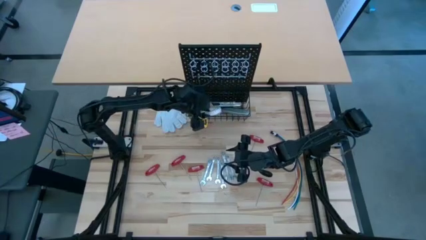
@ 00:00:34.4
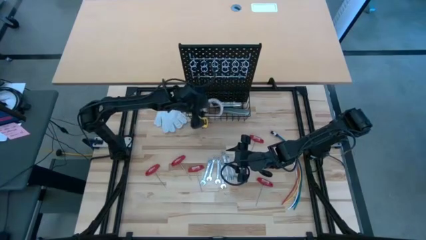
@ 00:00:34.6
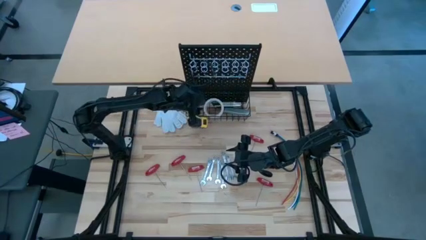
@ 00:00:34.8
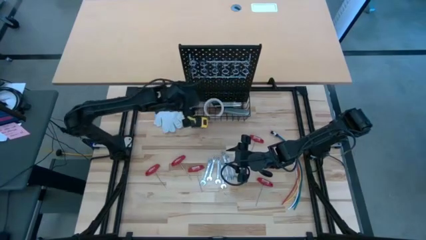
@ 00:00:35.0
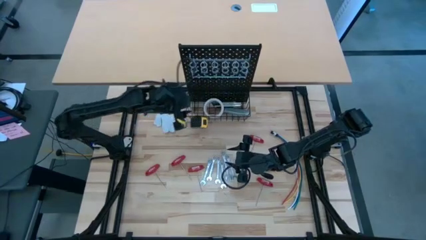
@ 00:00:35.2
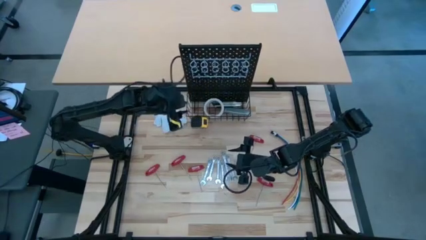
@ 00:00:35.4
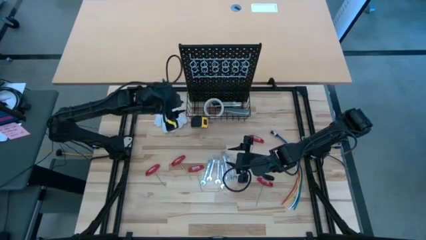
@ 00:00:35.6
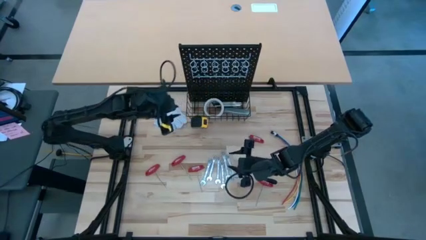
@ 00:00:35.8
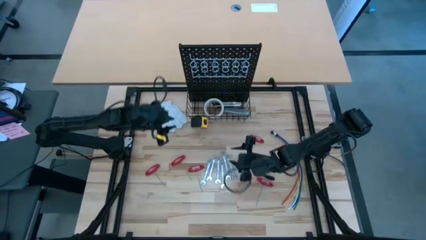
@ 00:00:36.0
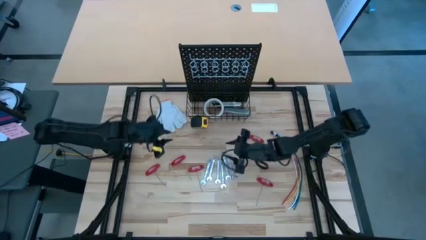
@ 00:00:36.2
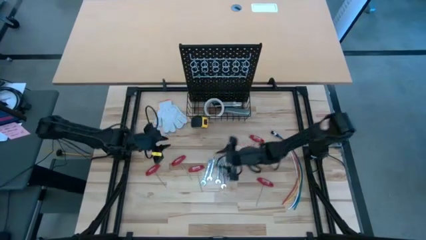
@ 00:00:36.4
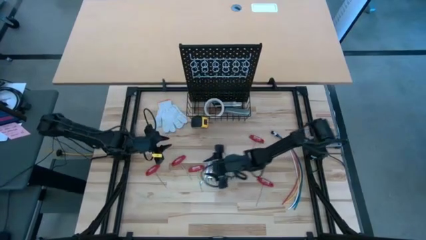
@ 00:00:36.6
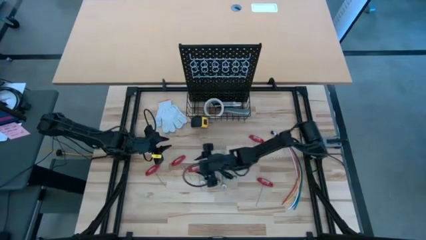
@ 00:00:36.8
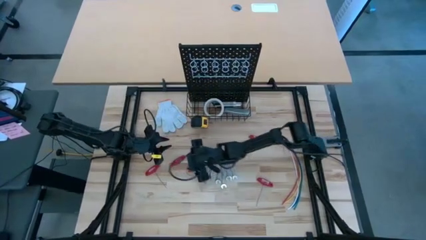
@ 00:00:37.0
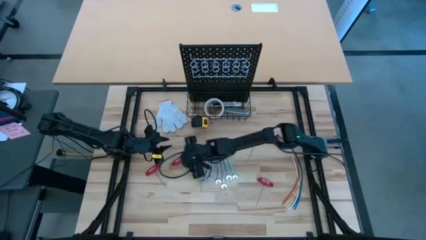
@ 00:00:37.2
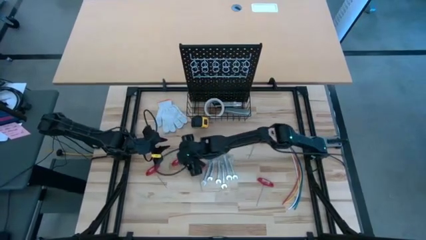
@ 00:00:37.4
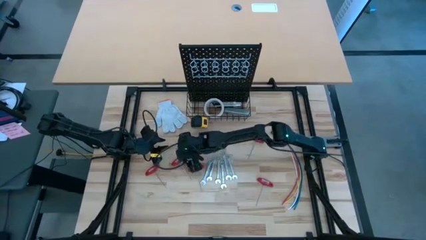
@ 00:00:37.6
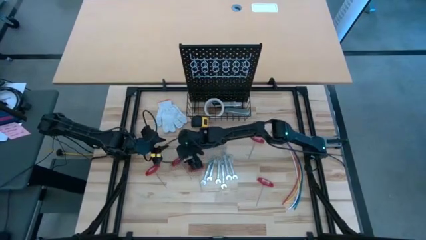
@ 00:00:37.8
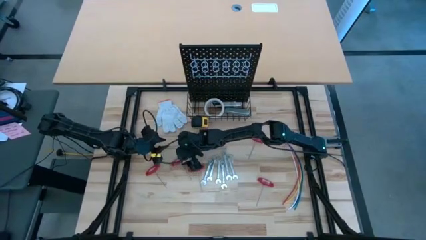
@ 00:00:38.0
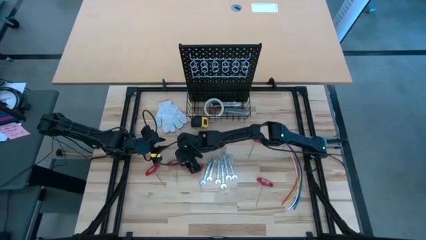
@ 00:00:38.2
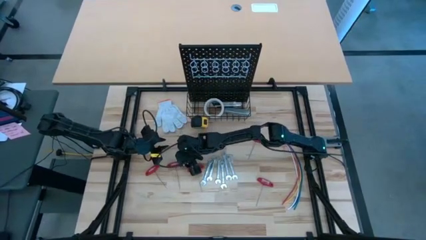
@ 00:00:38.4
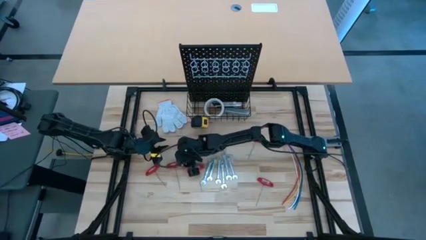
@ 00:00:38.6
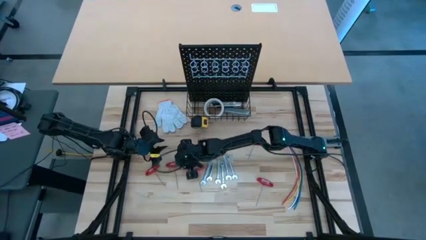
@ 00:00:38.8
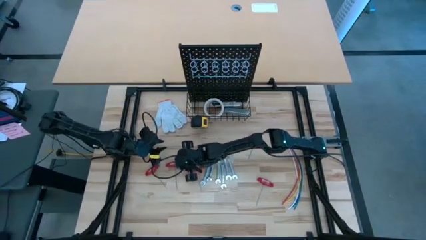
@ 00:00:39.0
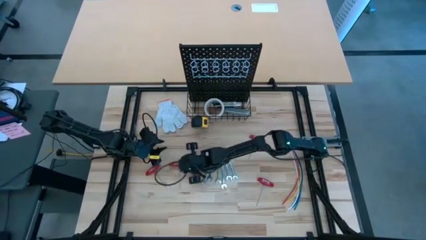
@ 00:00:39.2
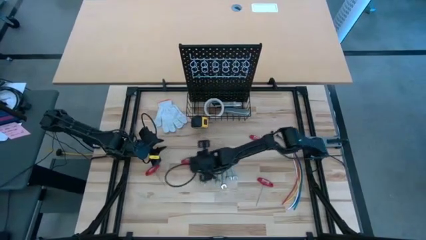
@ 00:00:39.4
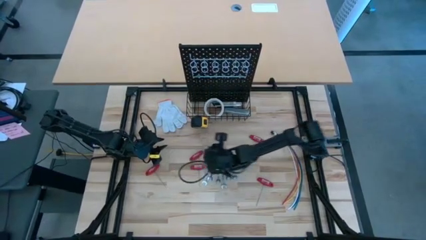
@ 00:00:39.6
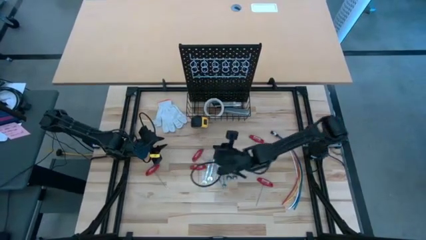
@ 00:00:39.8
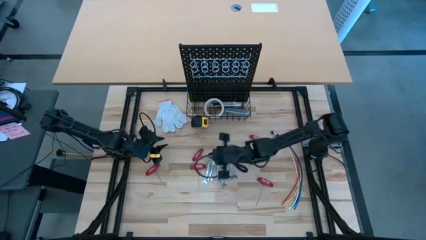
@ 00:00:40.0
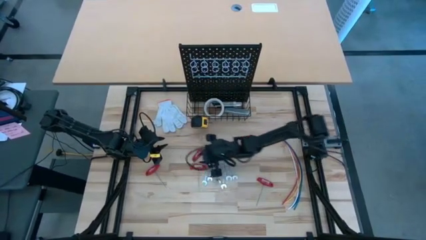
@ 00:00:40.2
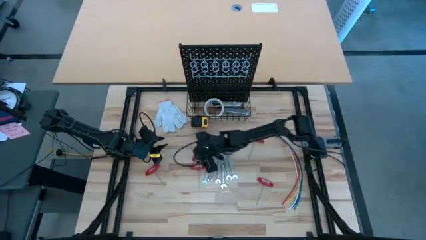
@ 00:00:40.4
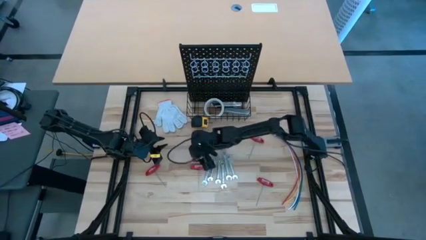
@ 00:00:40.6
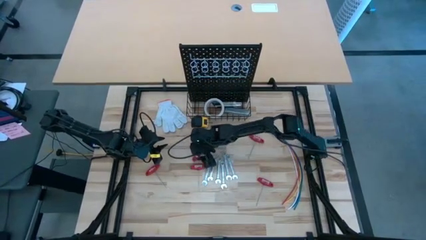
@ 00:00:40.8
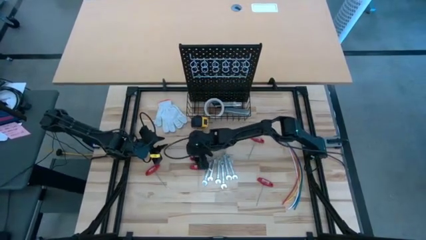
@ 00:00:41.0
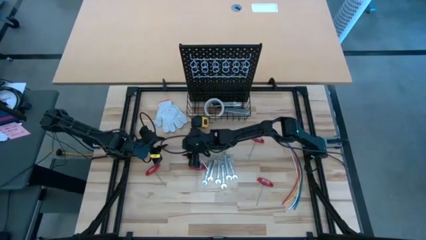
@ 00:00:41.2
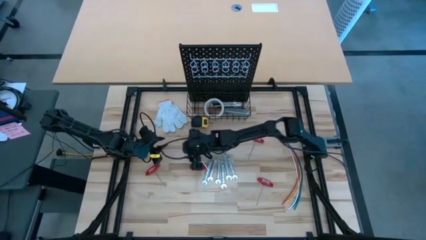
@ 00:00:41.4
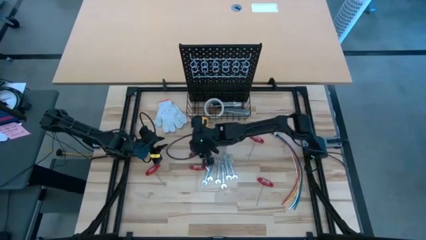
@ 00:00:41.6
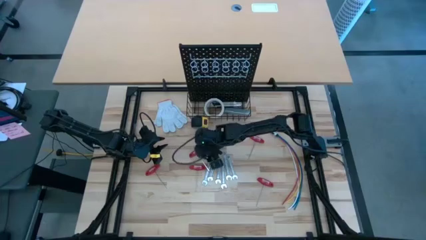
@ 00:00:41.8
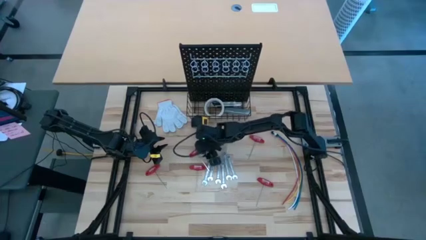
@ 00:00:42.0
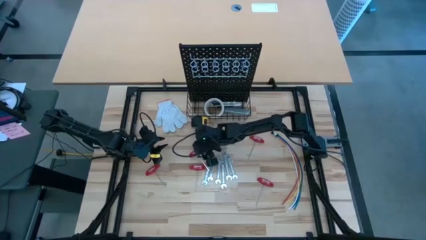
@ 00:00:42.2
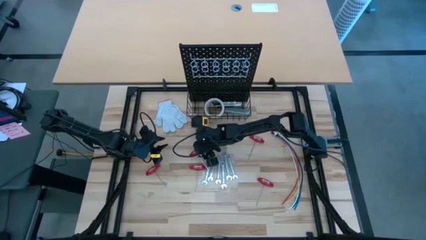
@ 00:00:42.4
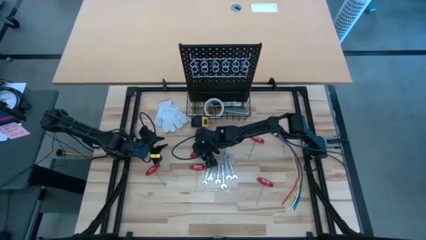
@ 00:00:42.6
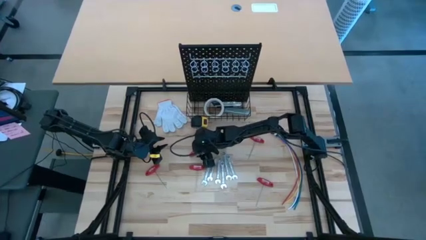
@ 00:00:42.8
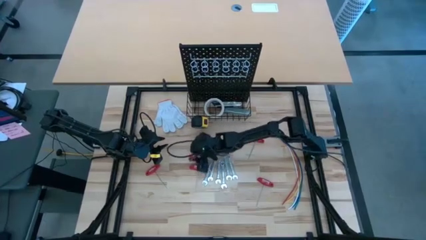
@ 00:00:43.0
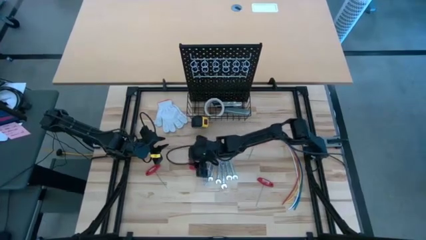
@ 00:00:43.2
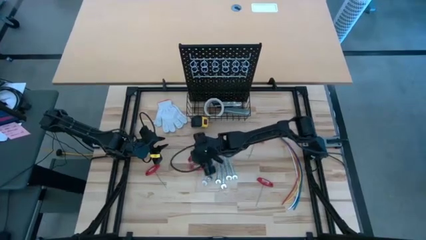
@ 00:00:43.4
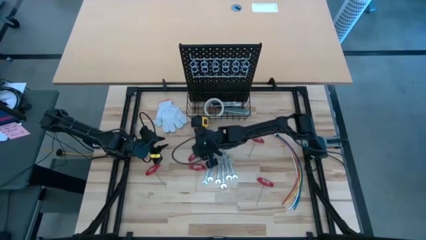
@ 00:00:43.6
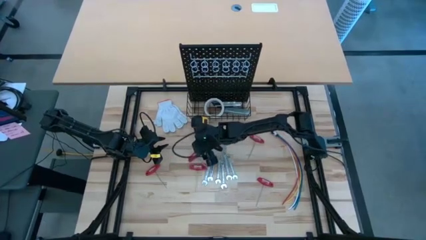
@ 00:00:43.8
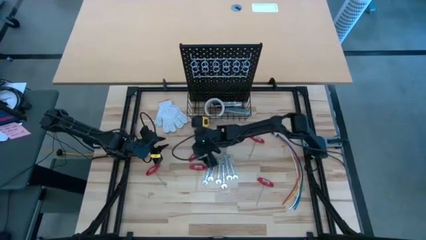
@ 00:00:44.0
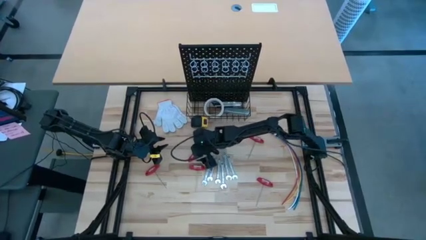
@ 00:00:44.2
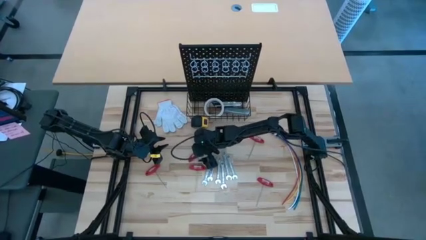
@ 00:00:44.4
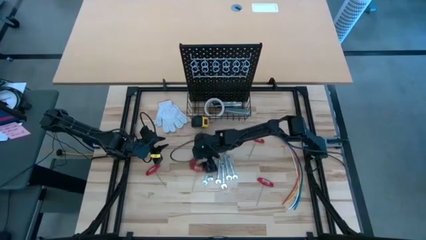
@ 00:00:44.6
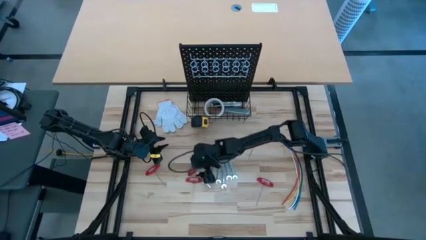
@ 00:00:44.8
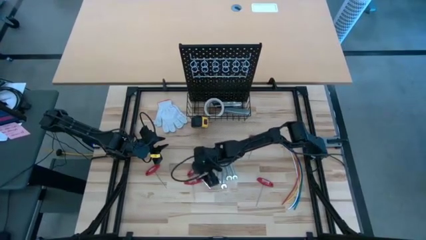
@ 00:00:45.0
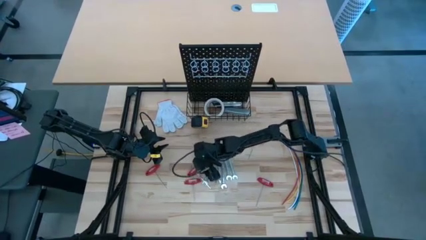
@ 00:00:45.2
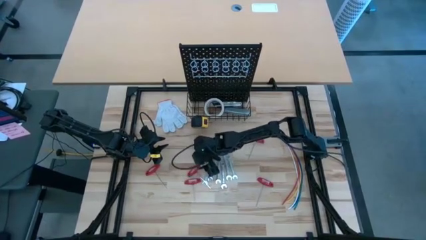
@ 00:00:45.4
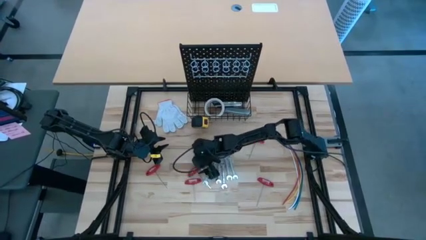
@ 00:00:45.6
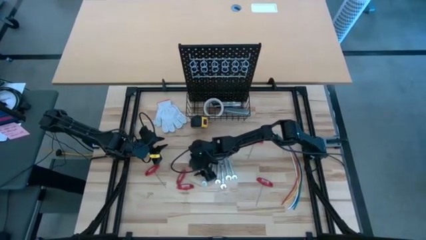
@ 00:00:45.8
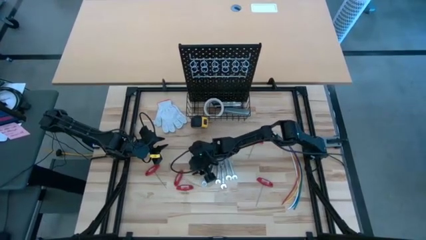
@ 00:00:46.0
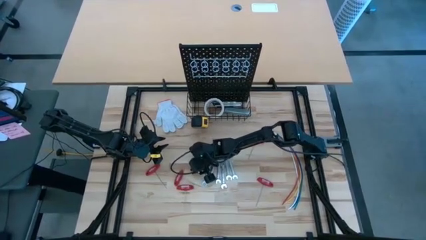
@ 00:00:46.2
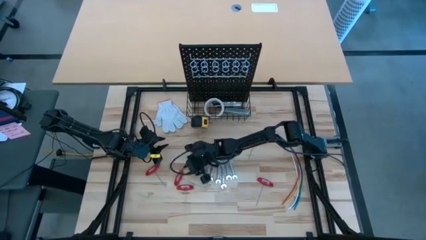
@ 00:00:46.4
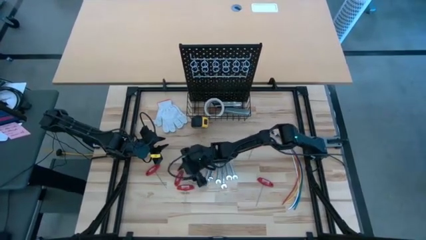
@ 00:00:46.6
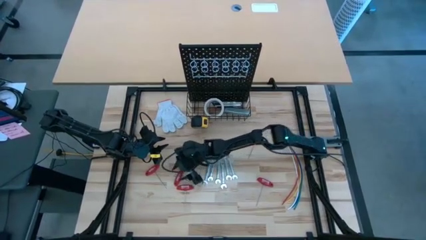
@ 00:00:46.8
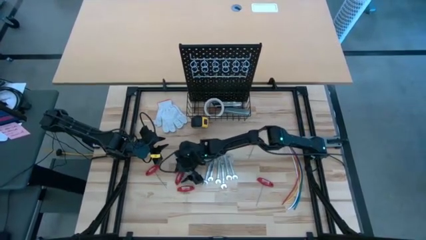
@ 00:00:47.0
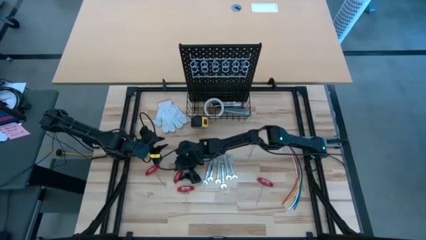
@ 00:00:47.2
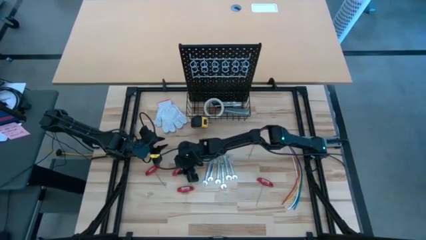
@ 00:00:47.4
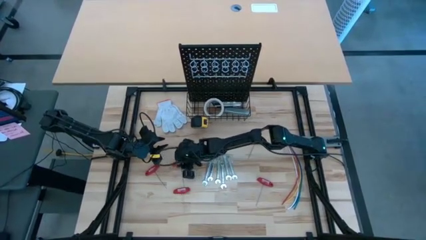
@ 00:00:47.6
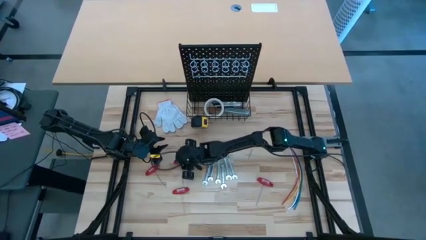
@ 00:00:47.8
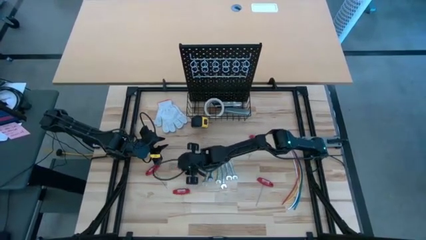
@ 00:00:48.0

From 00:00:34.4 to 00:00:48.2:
Task: Hang tools onto peg board
Hang the red Allen wrench on the pegboard
